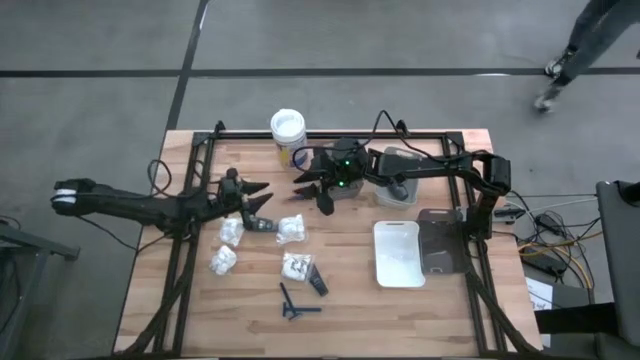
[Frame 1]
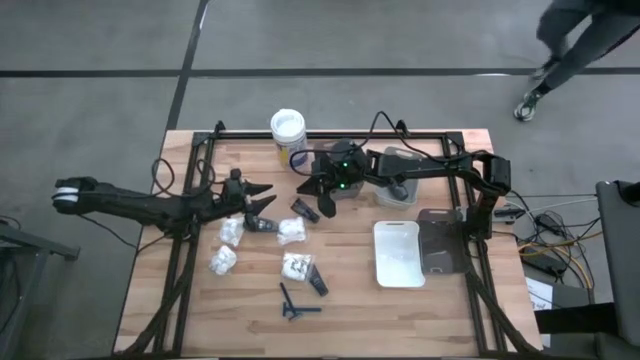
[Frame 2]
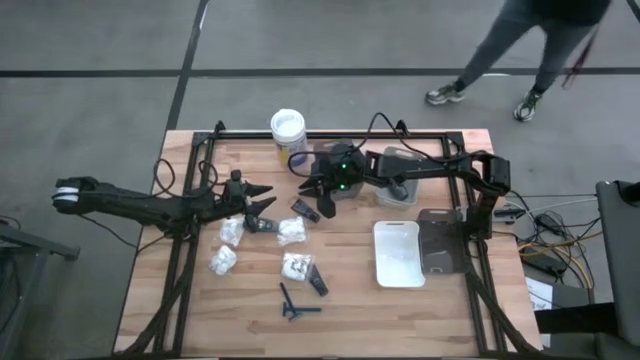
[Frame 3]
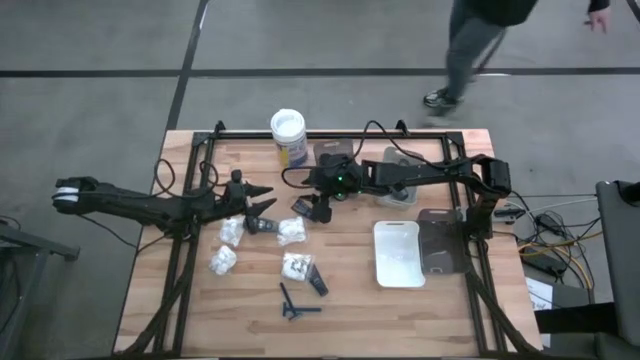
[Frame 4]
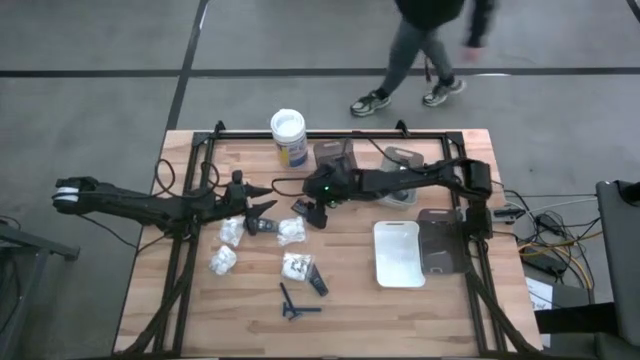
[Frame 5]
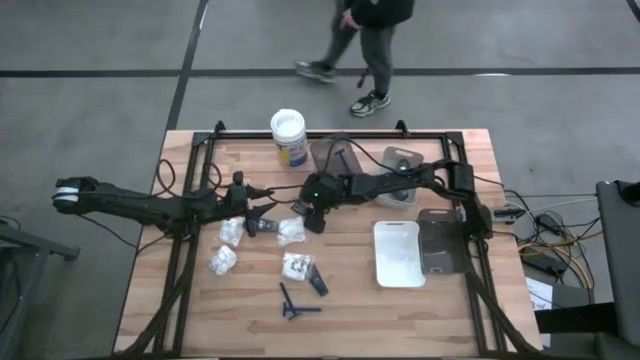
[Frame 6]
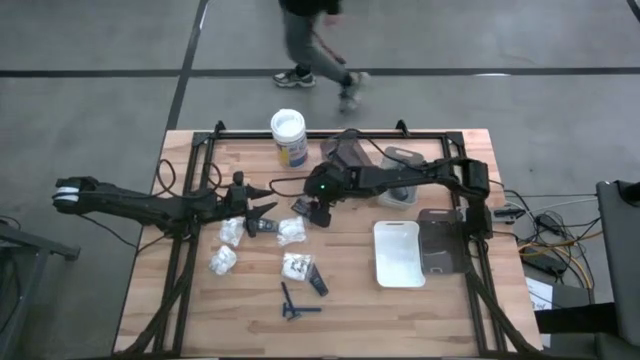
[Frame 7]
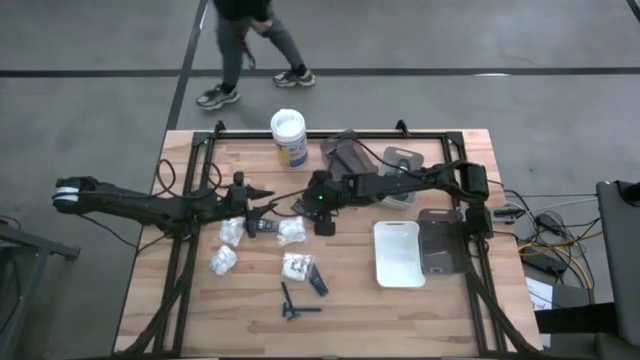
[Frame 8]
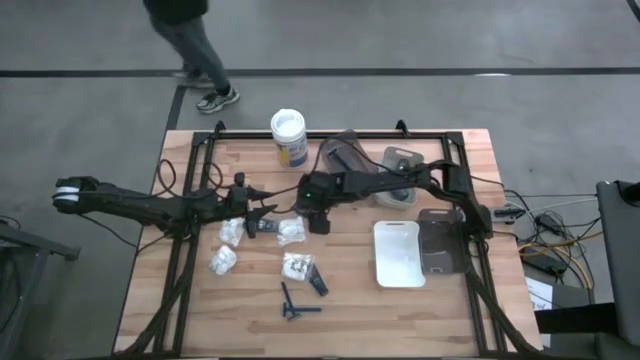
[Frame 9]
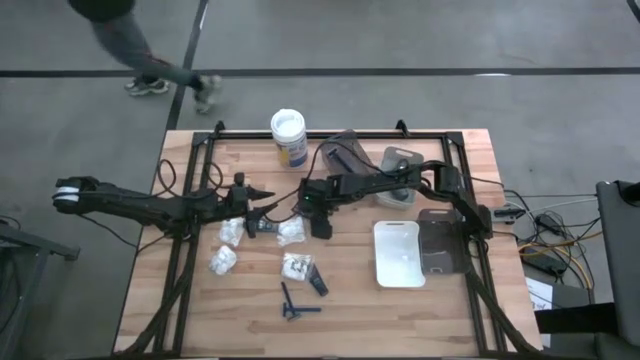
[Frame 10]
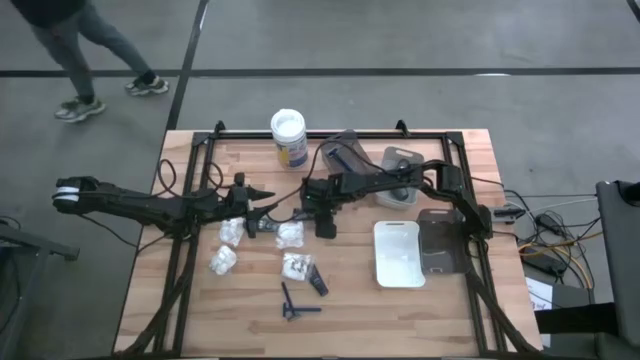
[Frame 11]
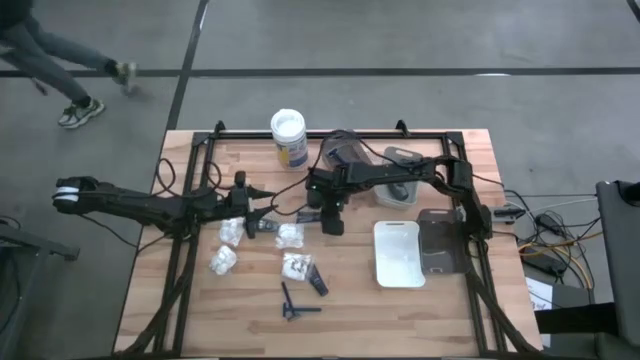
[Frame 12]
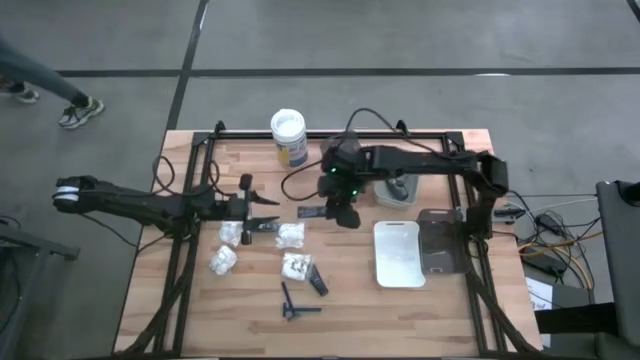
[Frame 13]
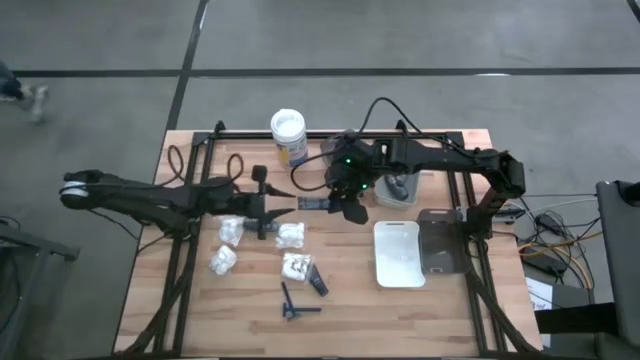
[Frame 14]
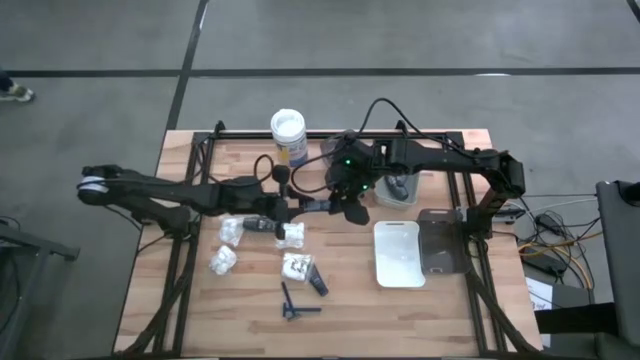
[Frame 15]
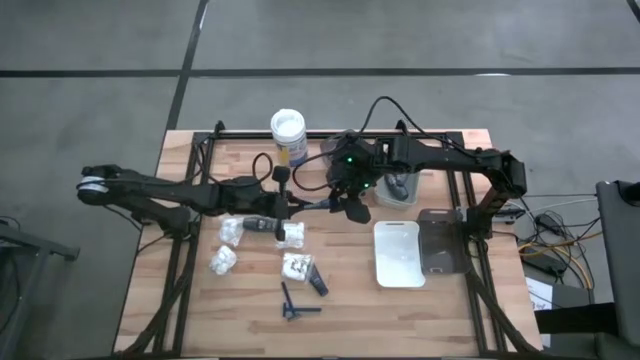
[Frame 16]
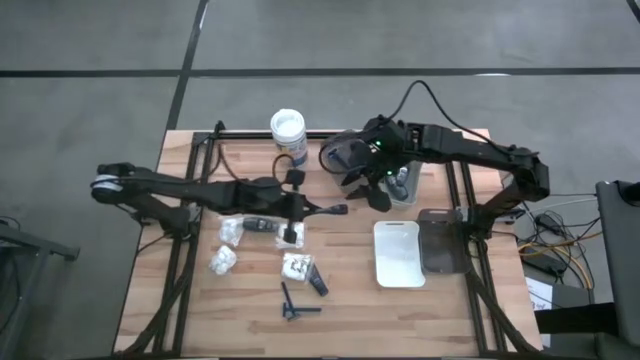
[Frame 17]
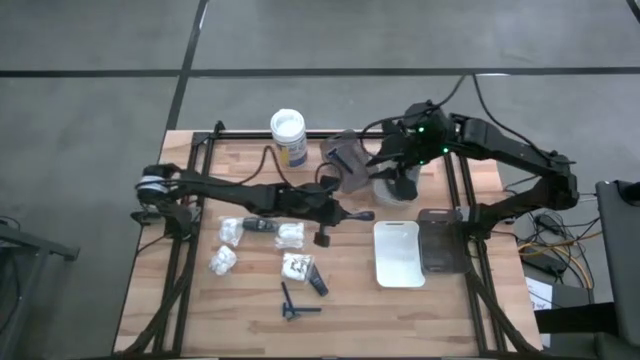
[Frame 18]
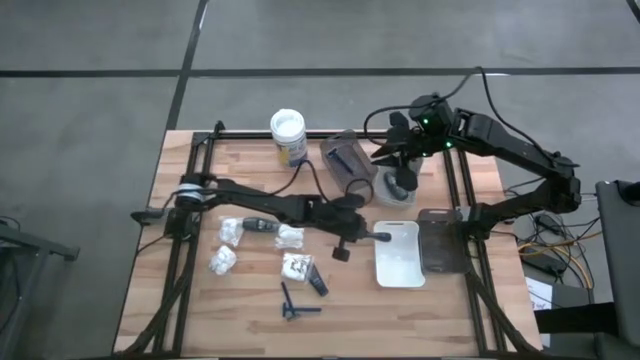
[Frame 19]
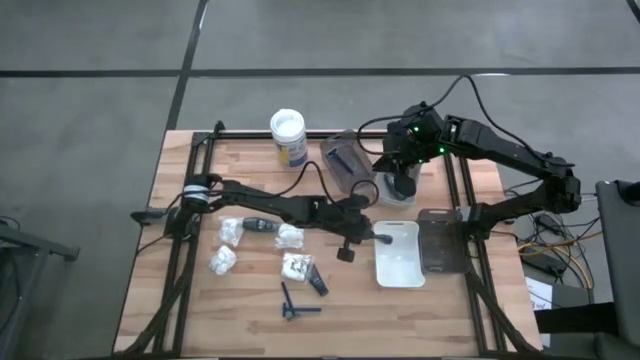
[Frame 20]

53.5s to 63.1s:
Task: Pick & Place Travel size toiletries
Put the blue shaving cream into the white bin

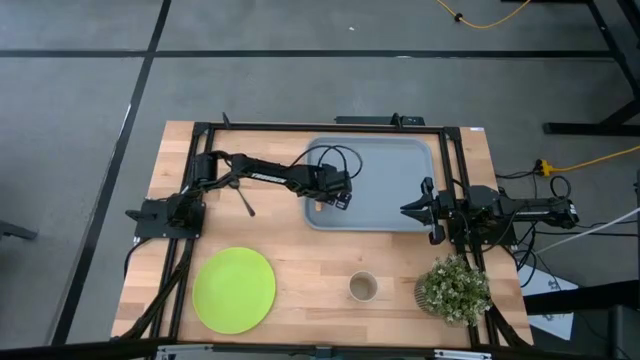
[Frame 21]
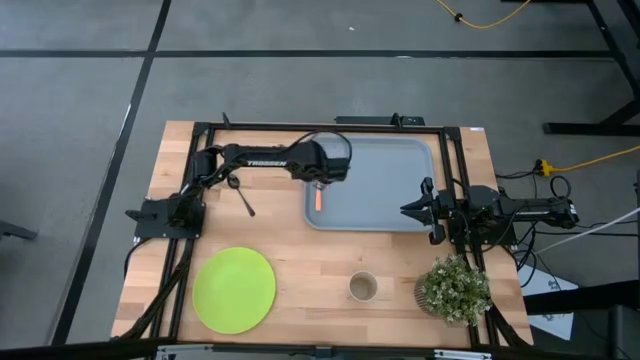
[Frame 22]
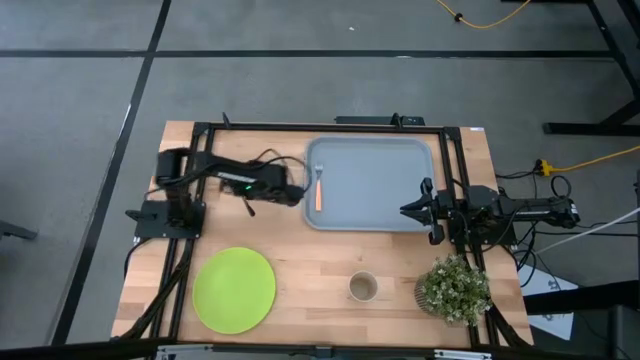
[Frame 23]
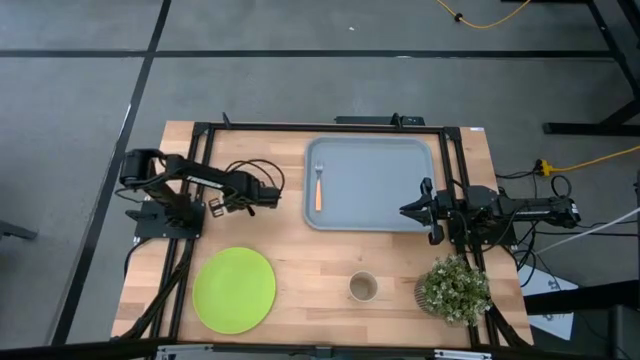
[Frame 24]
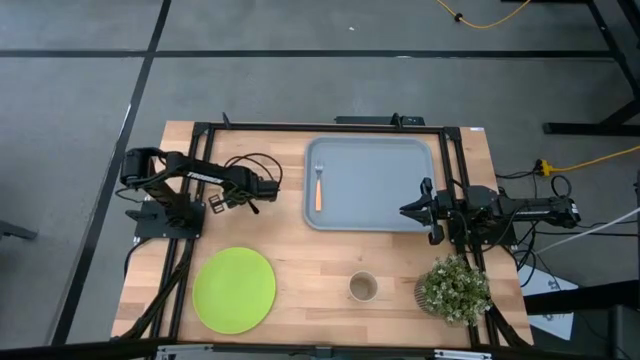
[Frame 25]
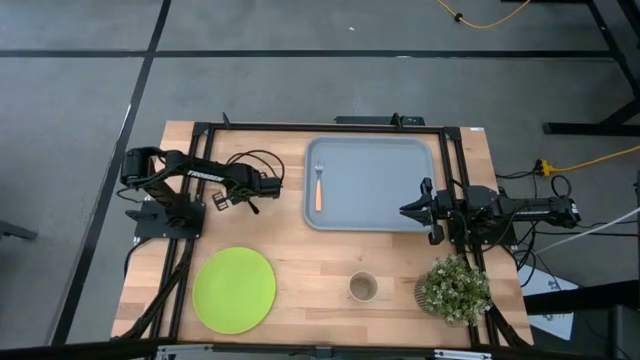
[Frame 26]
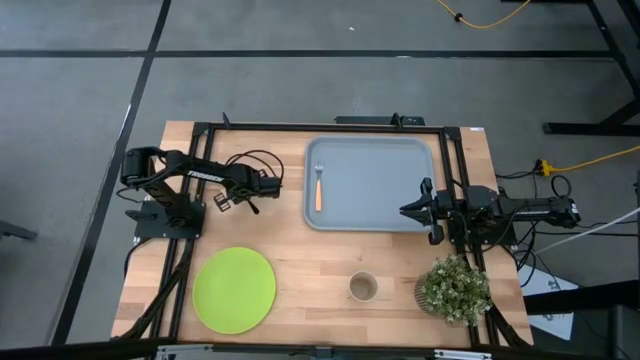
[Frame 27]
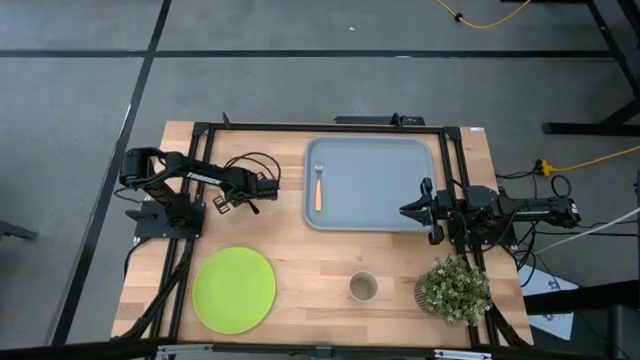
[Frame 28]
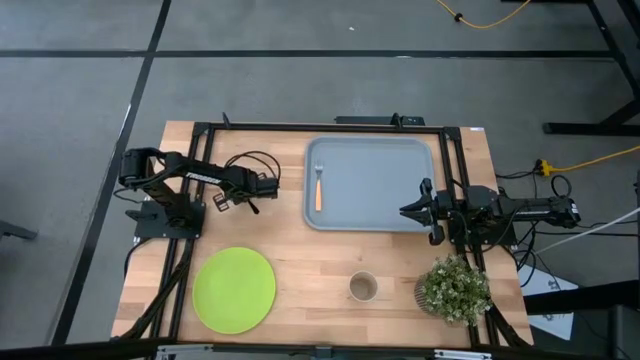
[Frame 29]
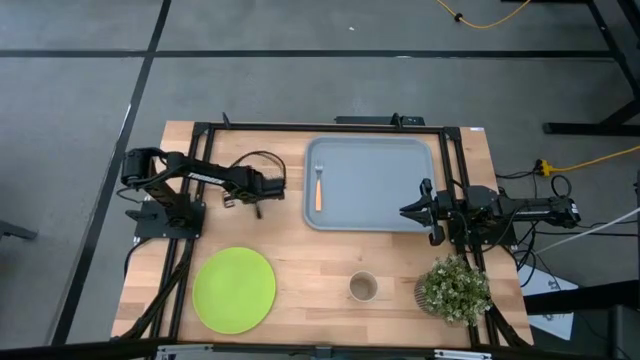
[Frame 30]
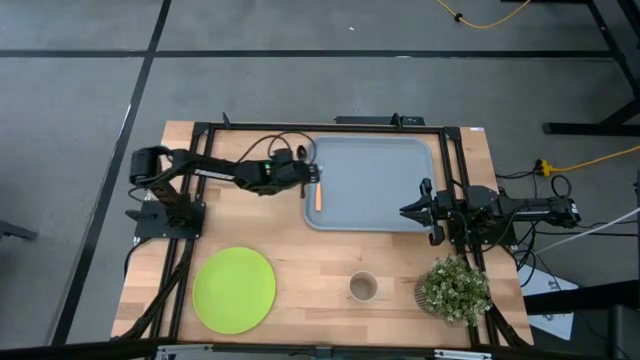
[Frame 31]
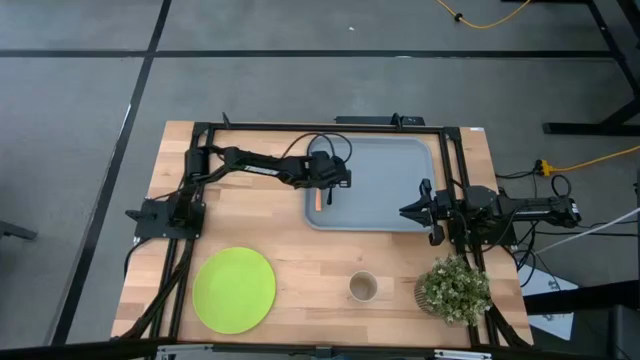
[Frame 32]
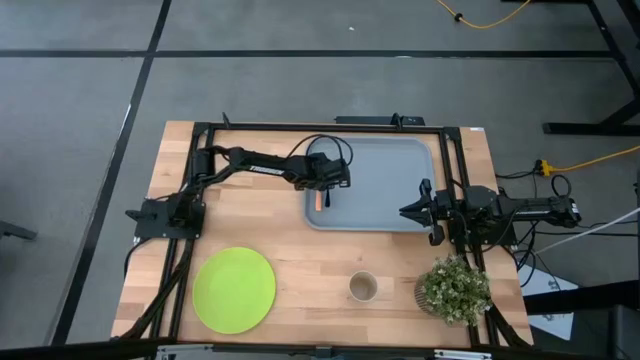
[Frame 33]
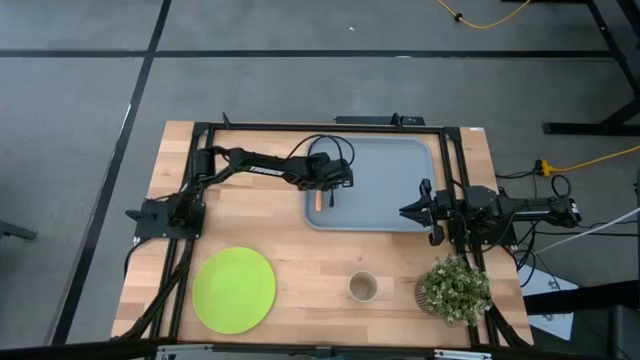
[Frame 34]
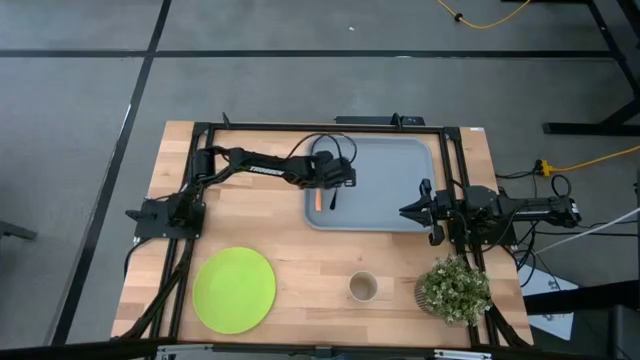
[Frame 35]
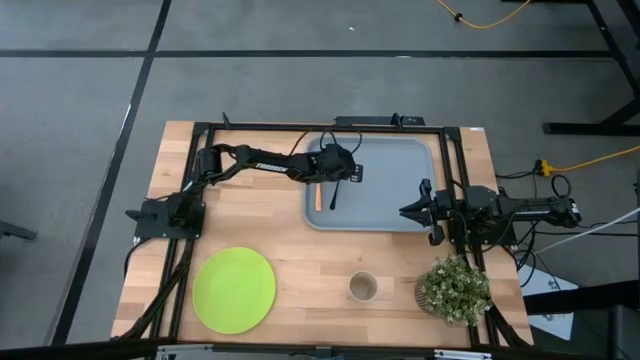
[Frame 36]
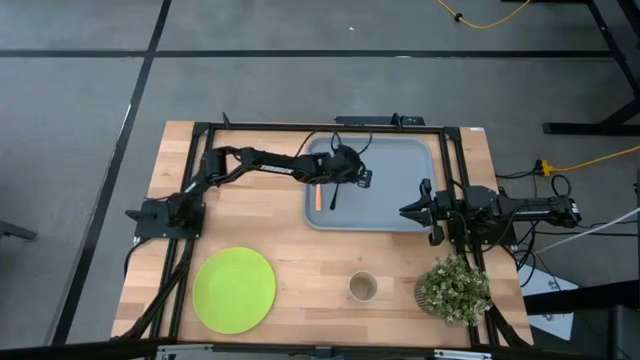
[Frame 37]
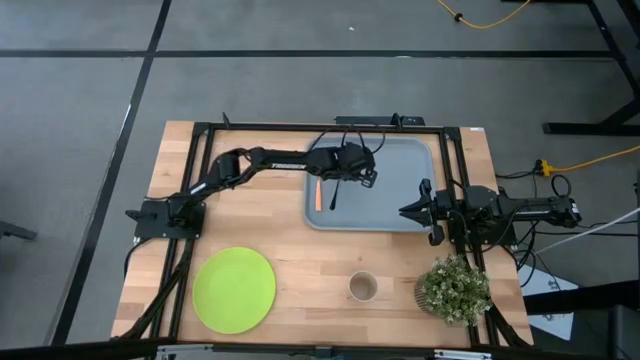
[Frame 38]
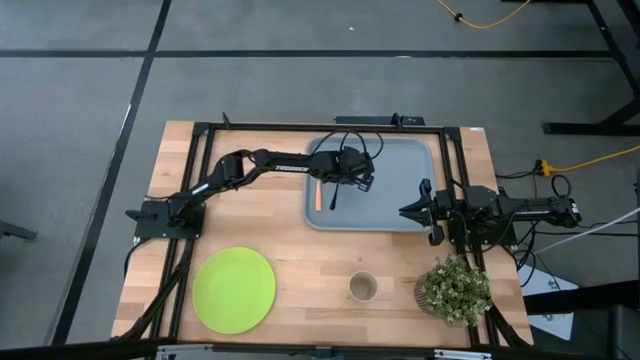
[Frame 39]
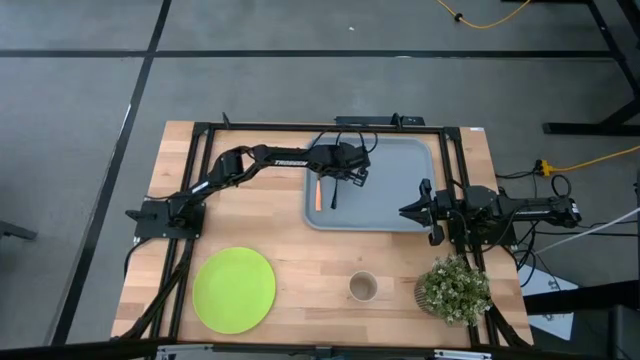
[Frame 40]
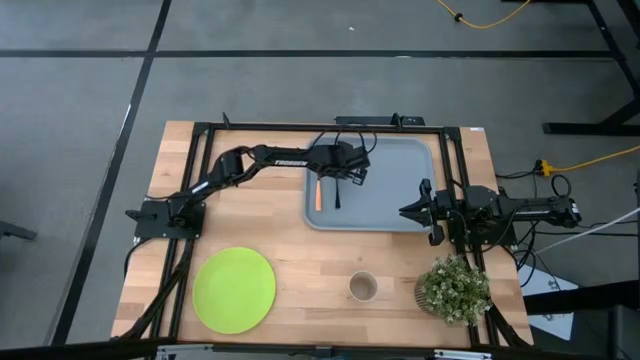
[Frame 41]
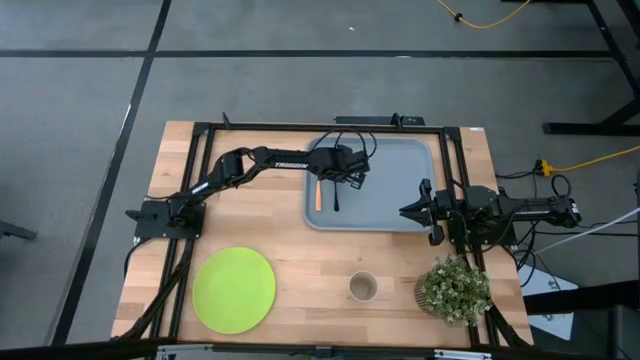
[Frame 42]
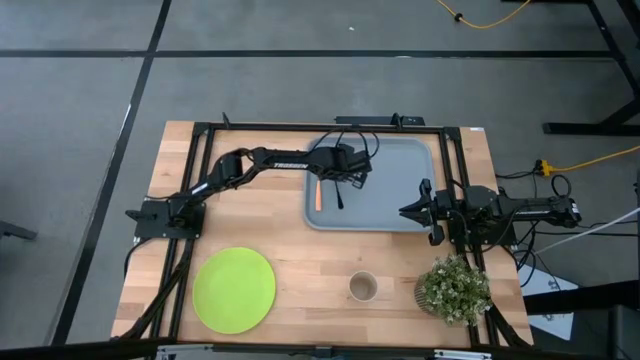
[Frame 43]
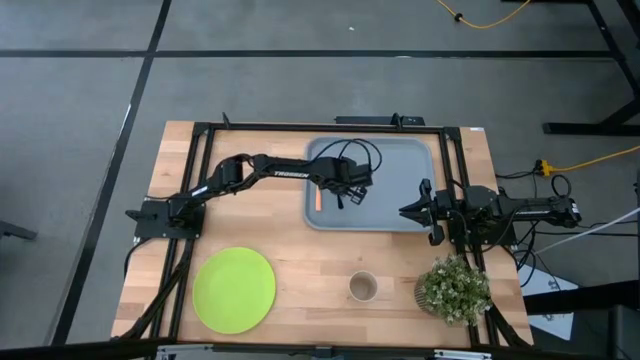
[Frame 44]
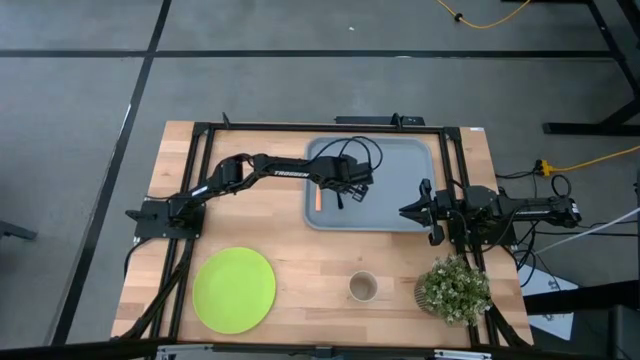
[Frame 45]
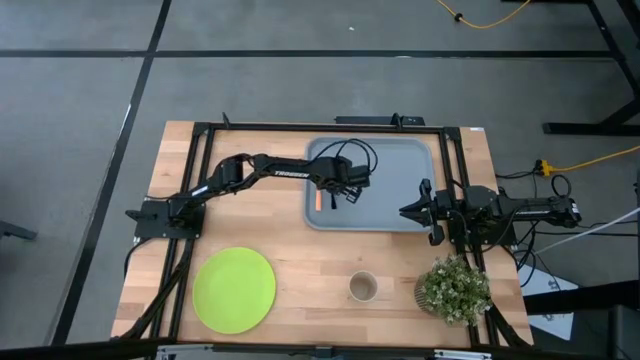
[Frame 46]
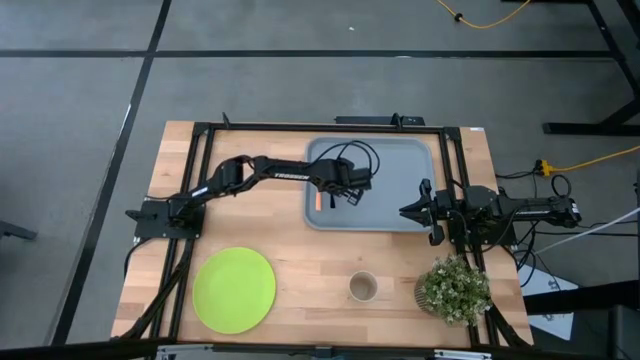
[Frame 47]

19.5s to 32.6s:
Task: Pick and place plate/cup/fork/spoon on tray
Put the black spoon on the light blue tray to the right of the light orange fork
